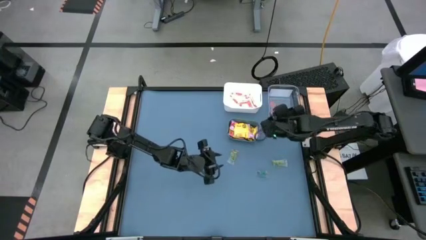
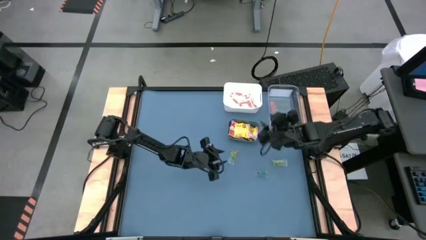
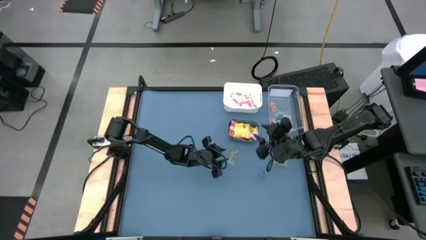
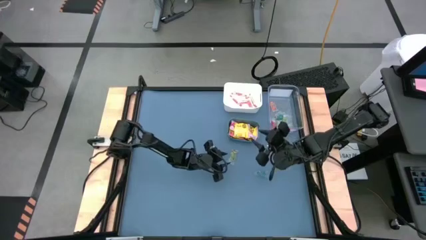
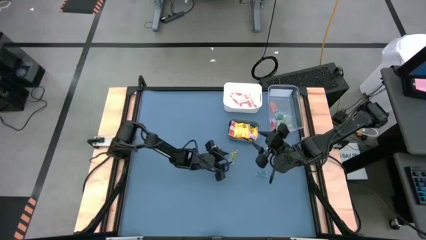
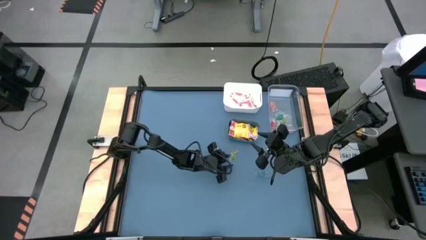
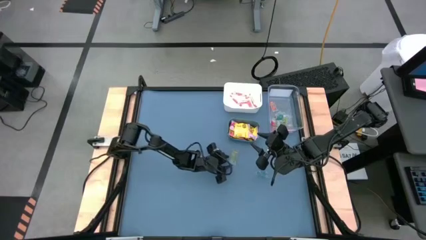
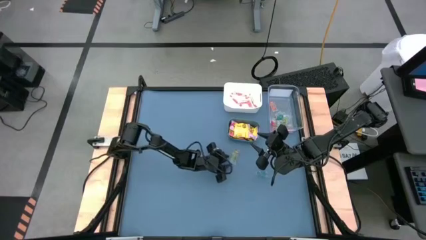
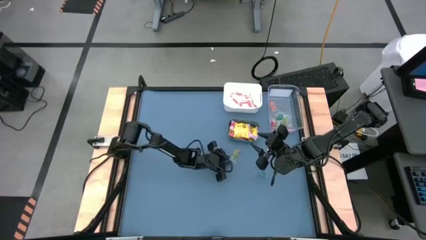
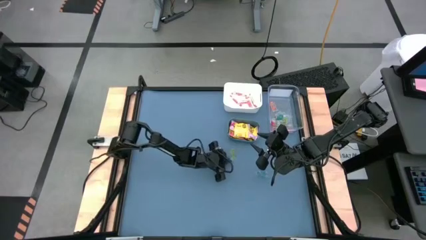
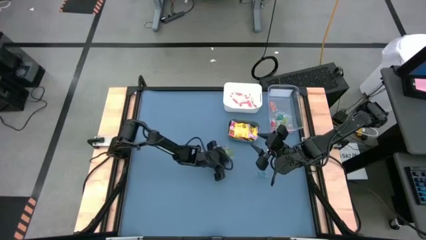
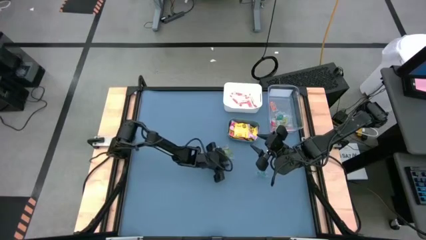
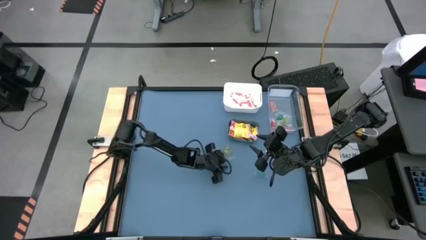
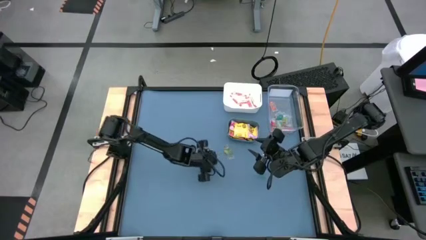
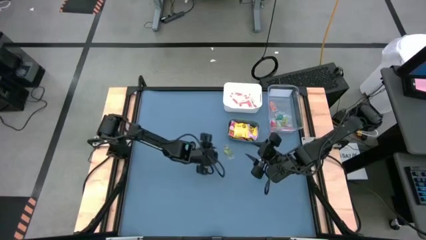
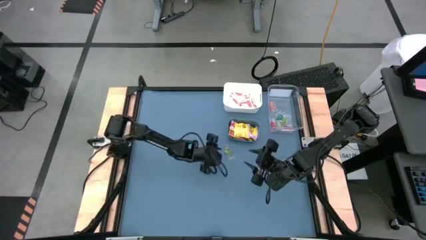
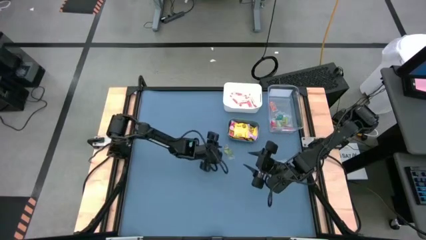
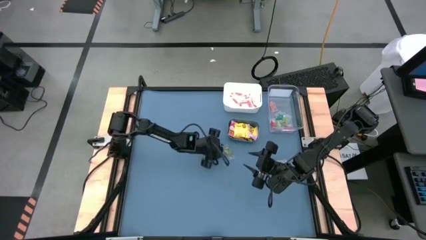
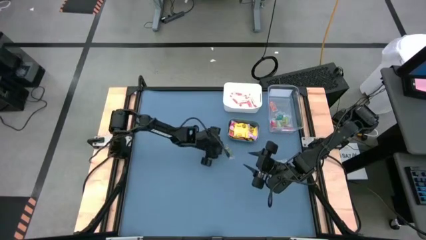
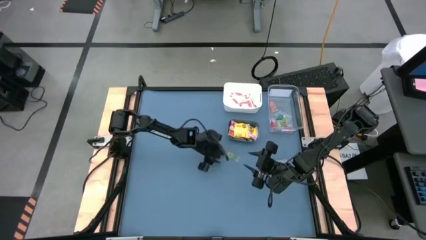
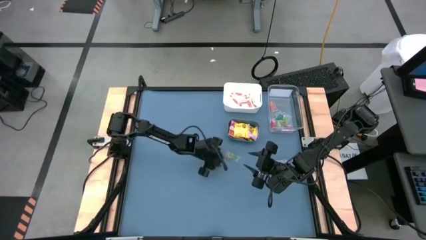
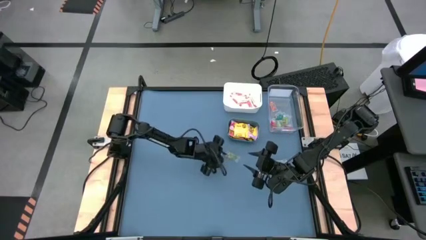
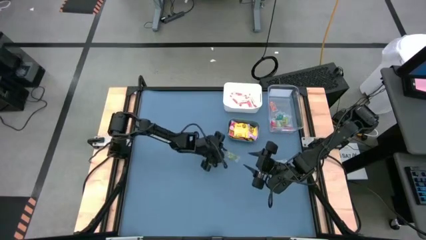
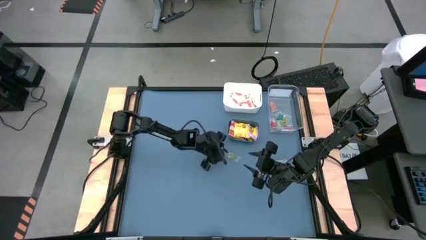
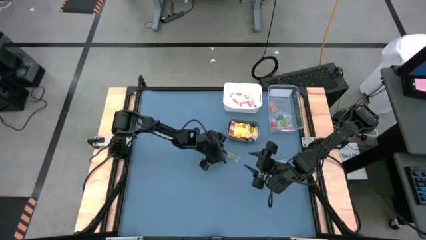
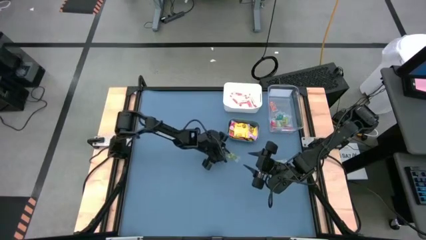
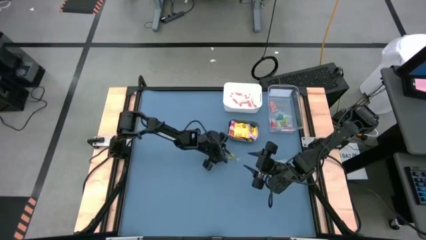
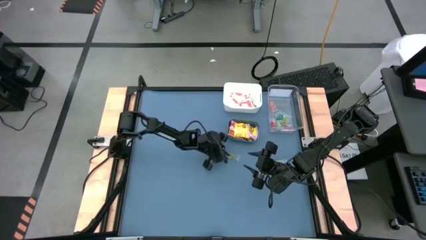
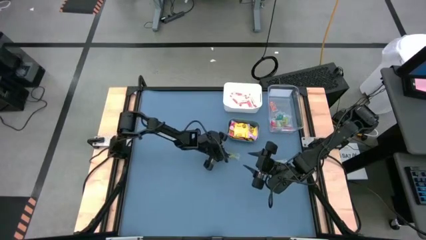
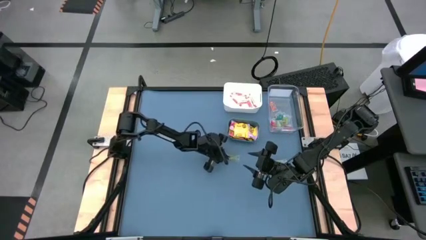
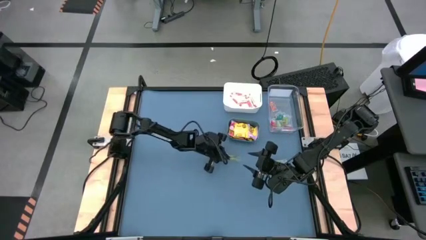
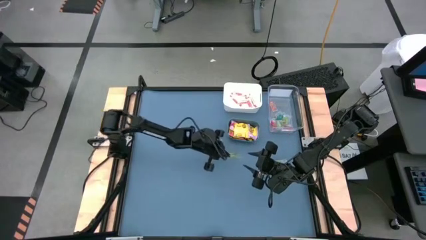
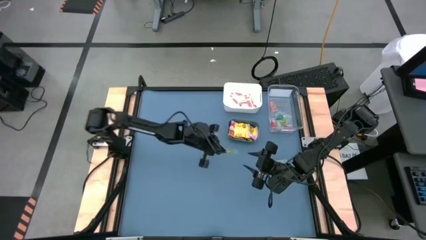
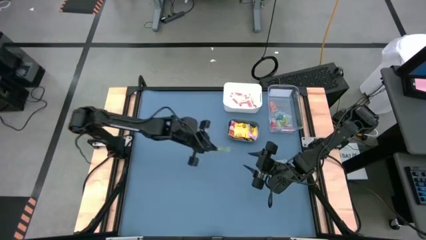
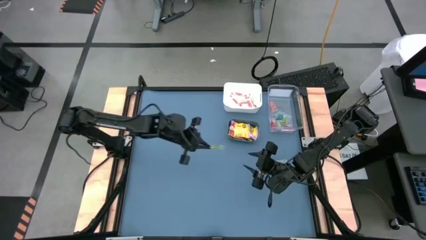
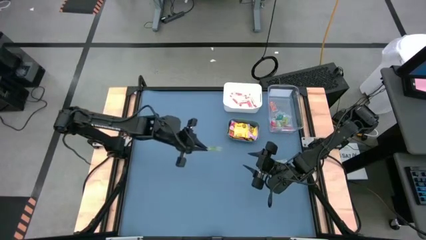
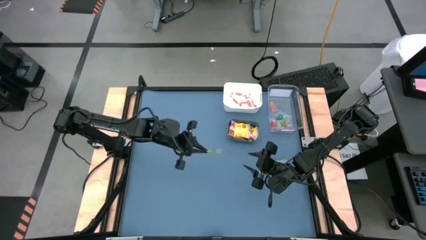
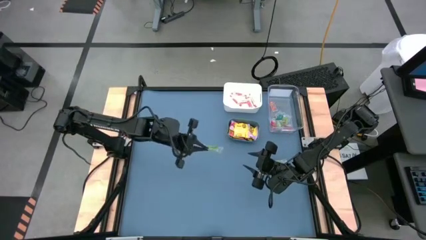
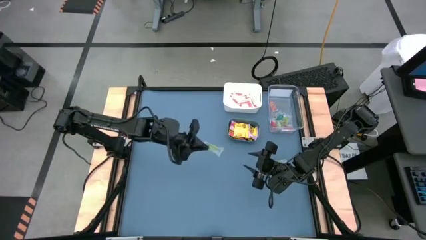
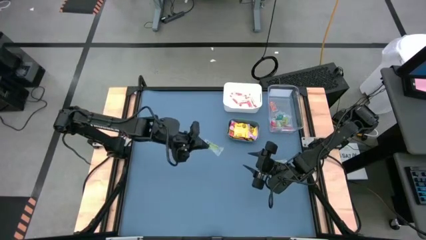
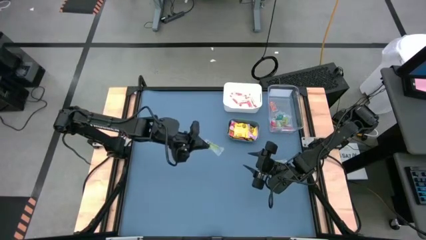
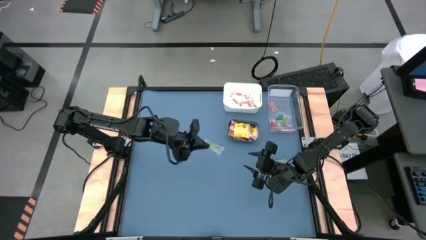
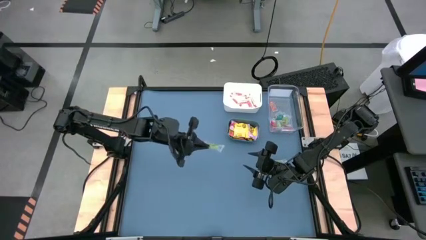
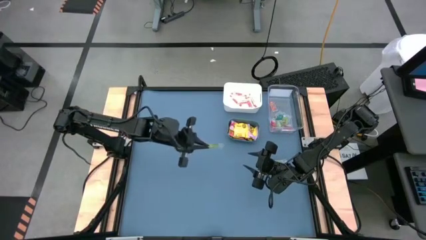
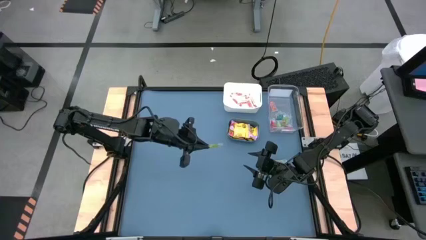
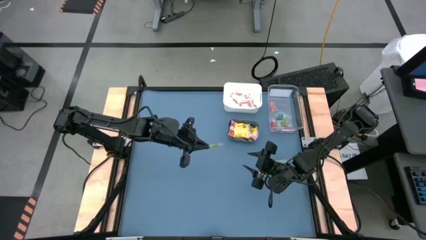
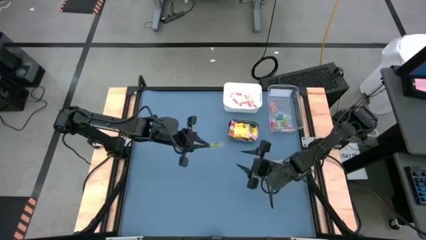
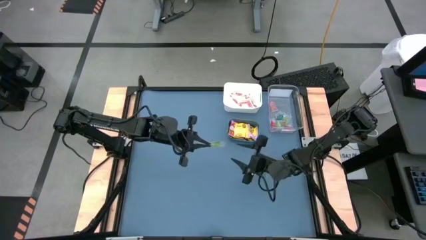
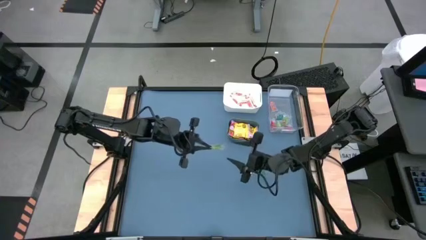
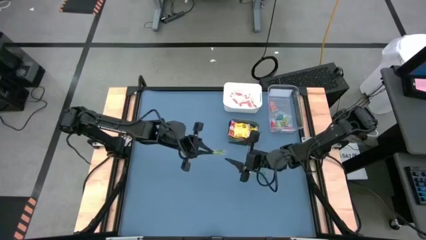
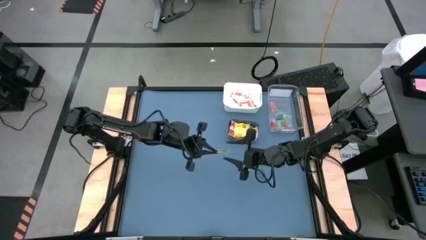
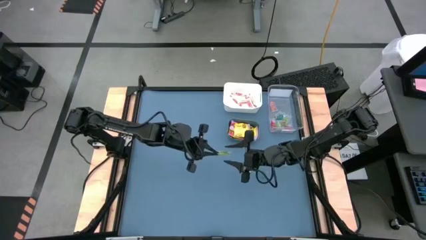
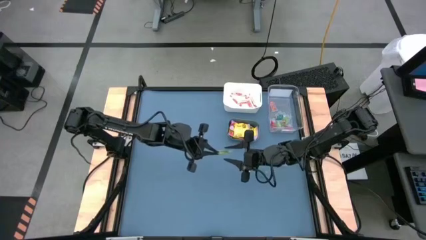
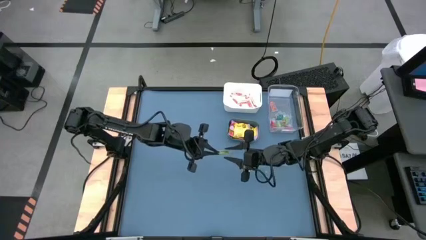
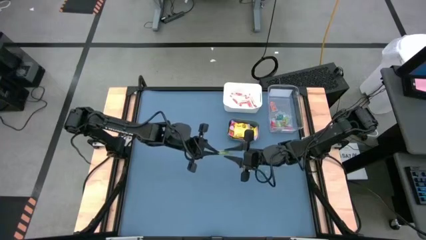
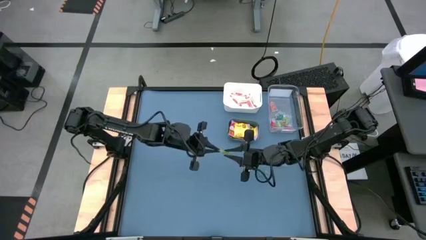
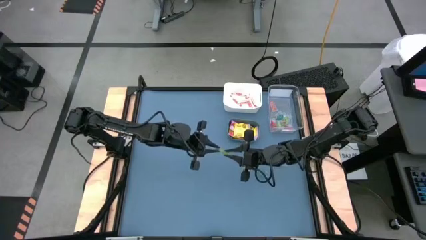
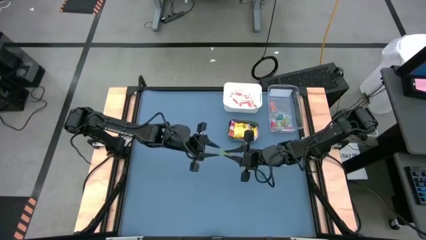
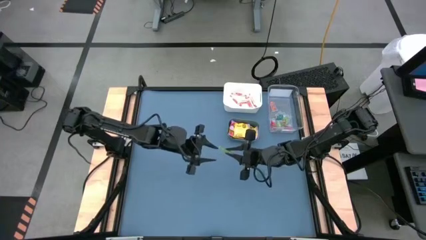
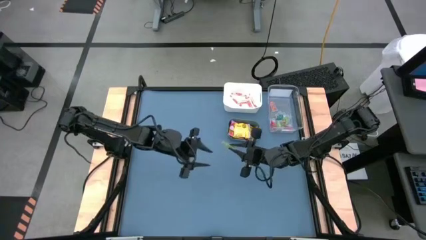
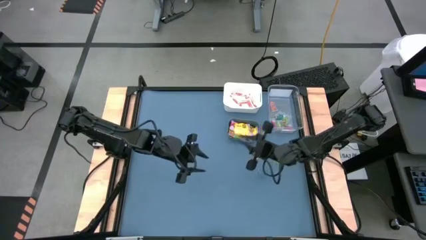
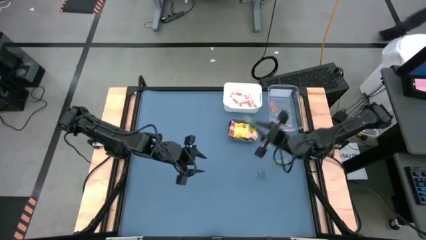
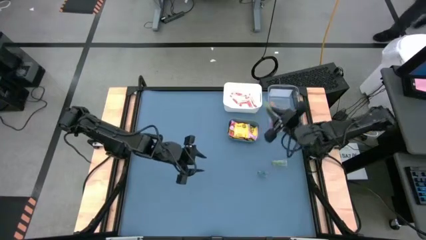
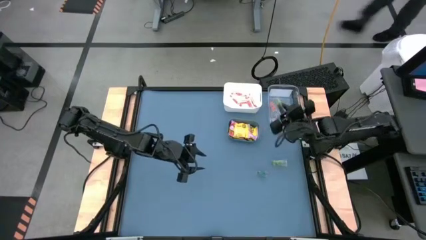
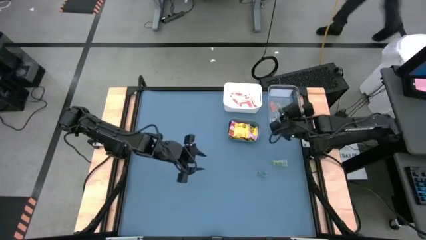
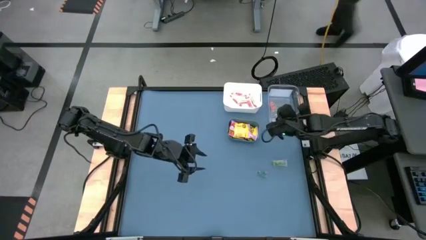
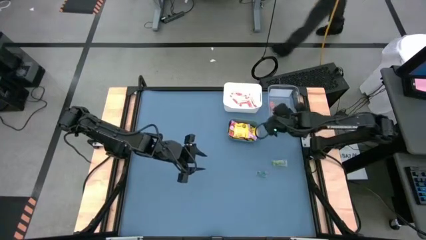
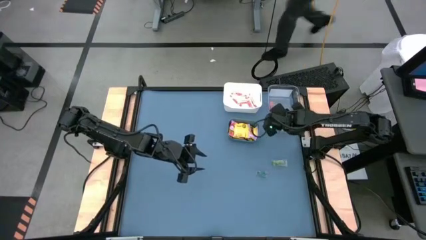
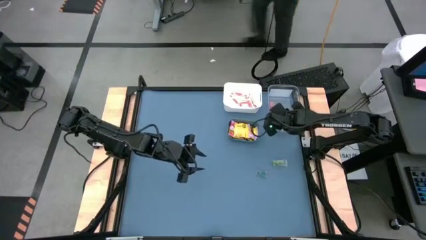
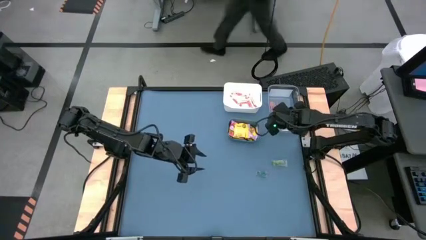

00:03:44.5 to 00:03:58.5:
Task: Sort candy
Put the top left green candy into the transparent bin

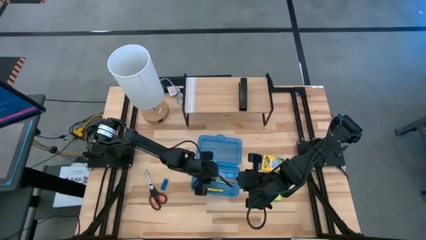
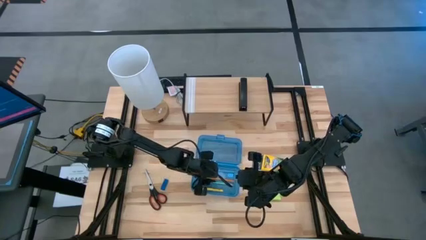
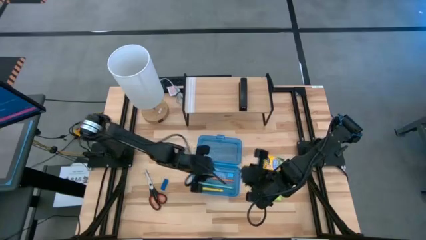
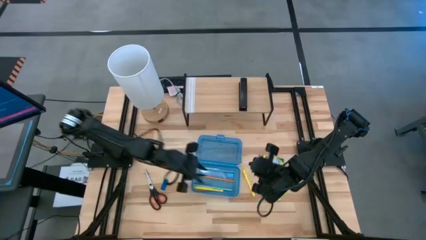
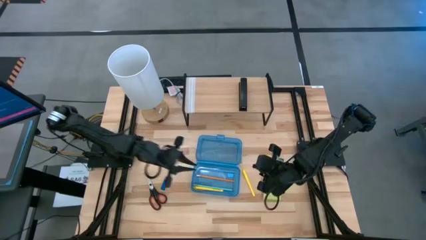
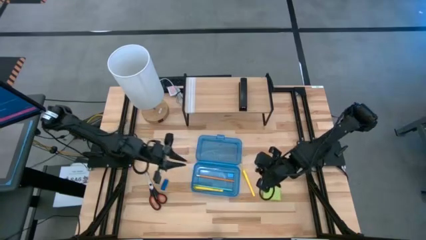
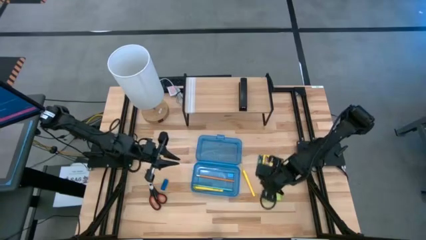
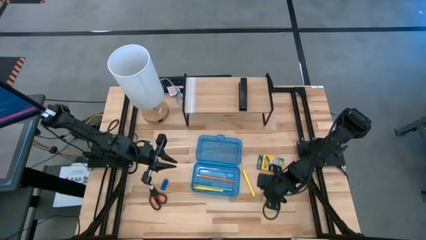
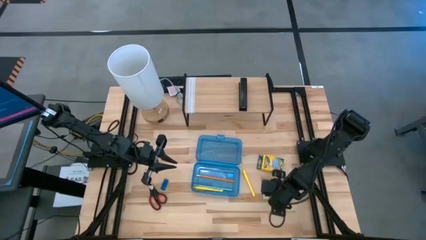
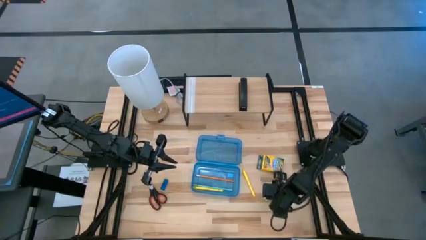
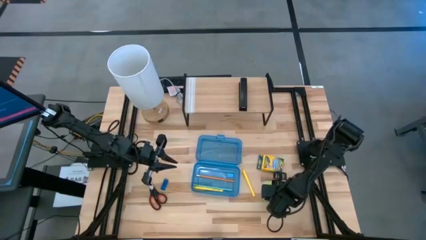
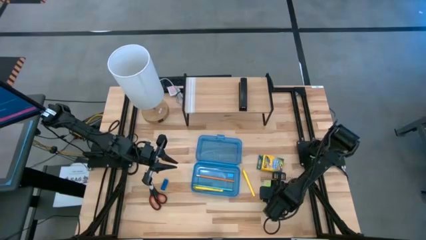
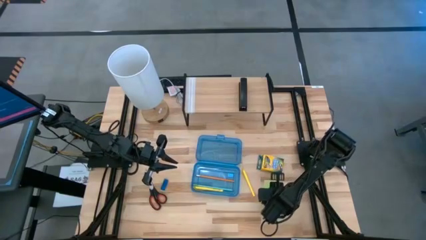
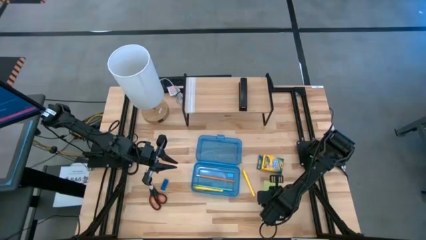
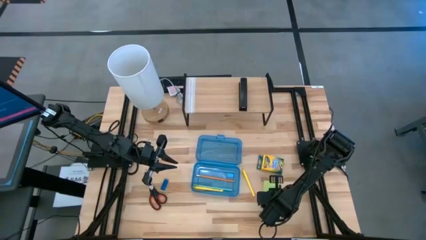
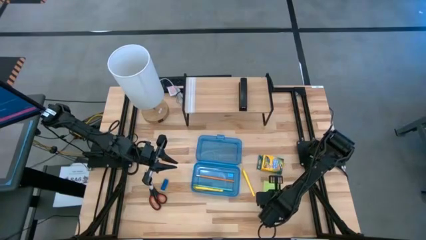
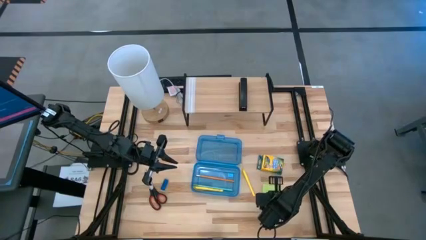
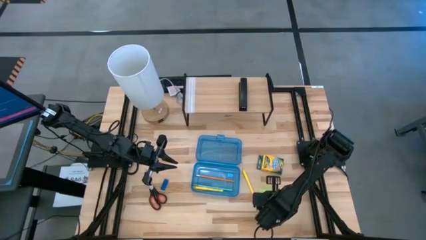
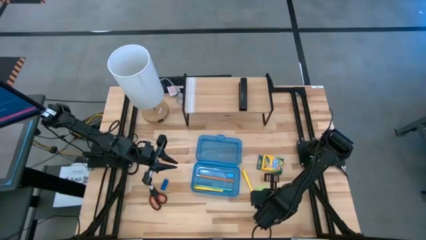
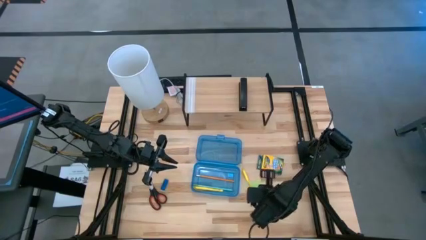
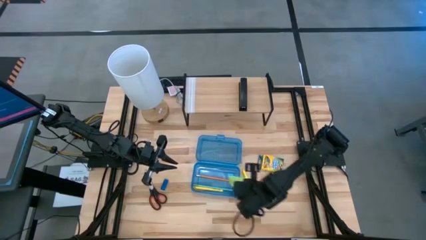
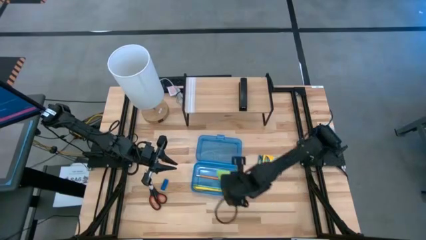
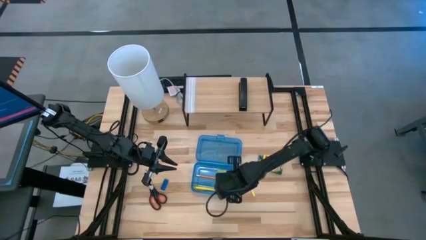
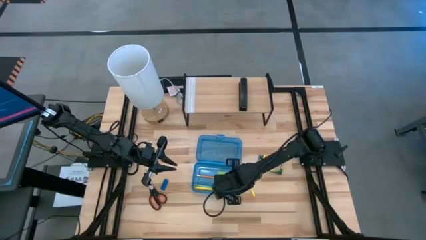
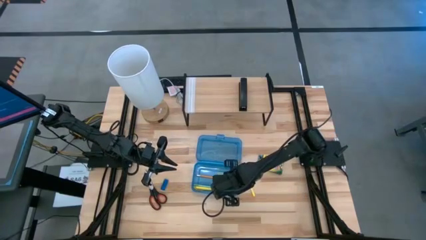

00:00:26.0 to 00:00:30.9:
Task: Pack school essentials
Put the green sticky notes pack into the blue supply box
